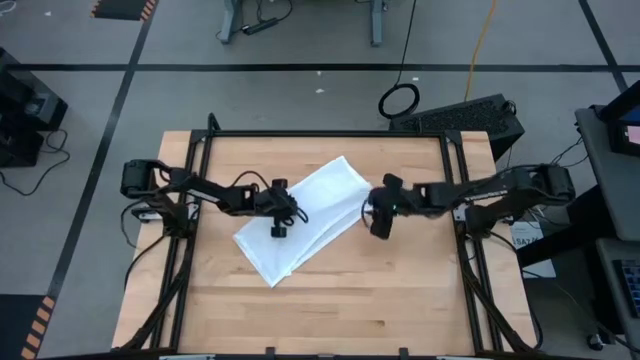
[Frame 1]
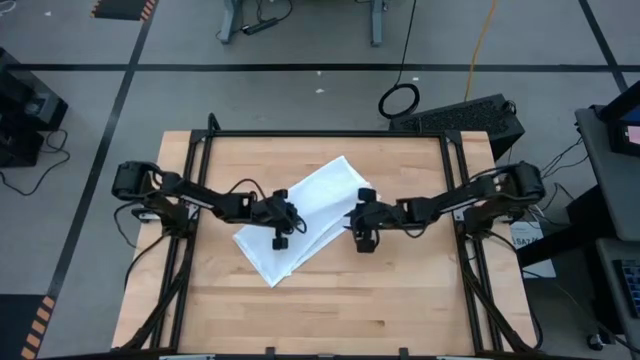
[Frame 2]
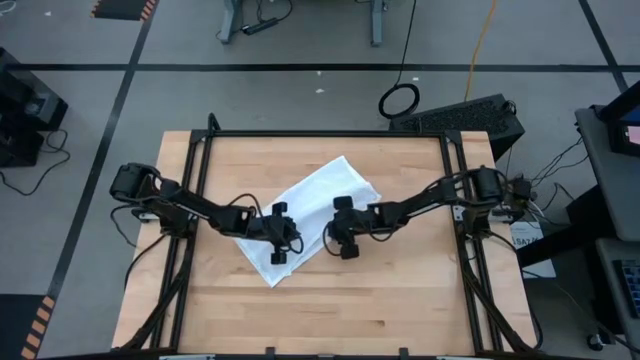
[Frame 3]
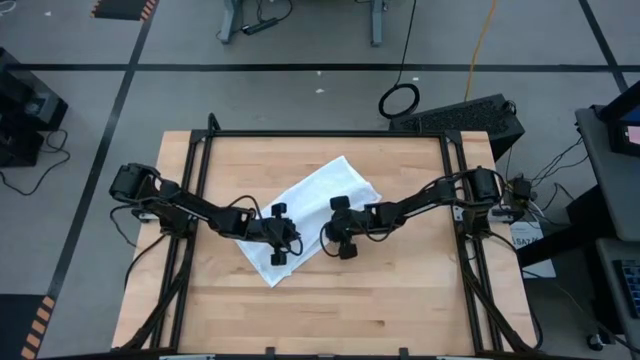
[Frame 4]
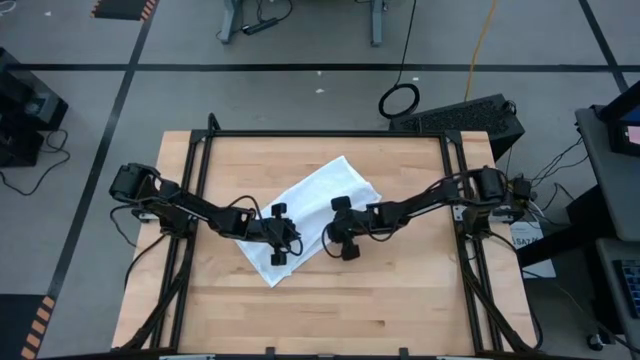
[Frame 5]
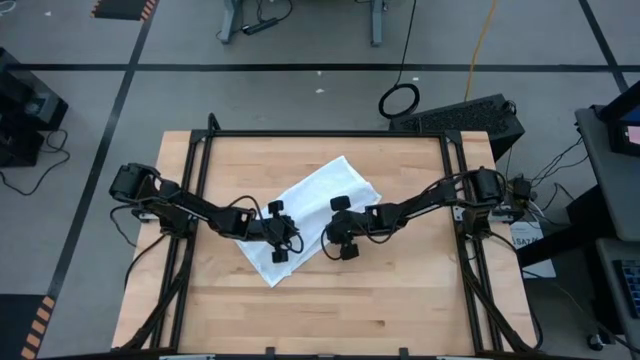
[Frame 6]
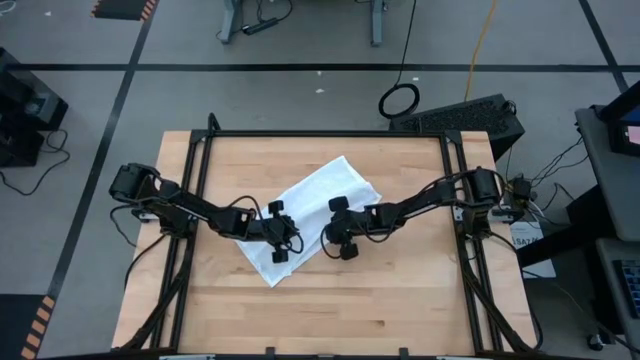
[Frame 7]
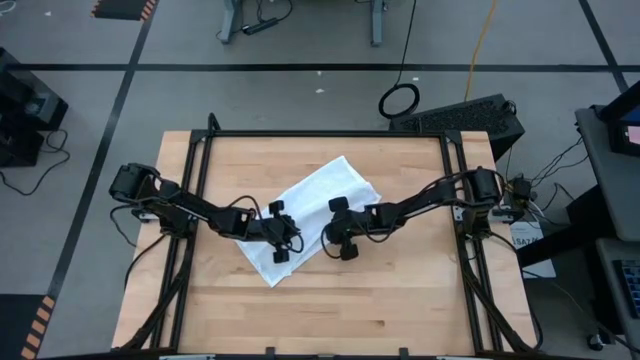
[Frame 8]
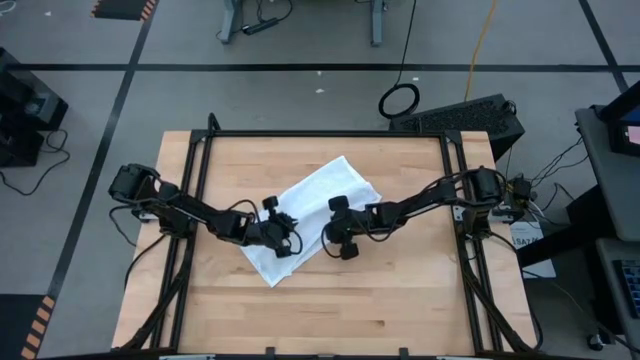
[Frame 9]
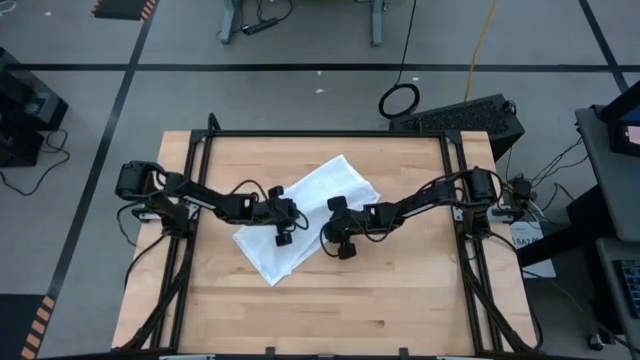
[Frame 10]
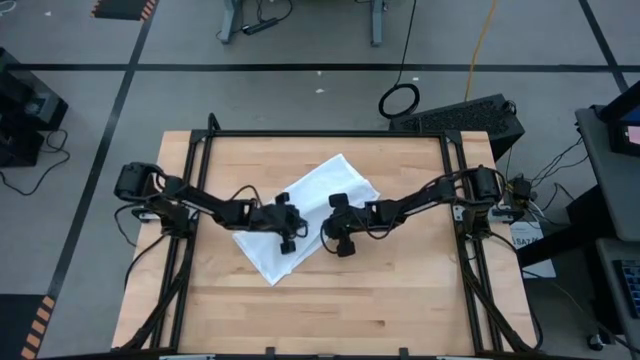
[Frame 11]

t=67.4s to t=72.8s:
Task: Roll napkin
Fold the white table napkin

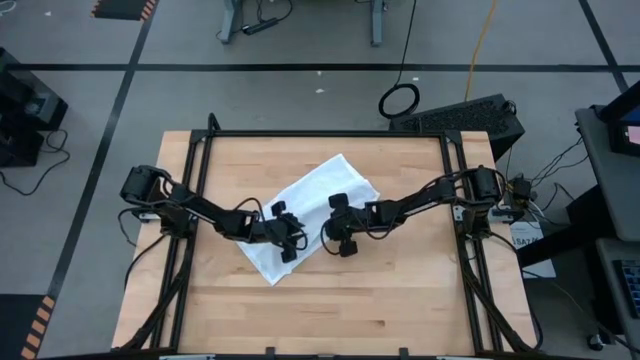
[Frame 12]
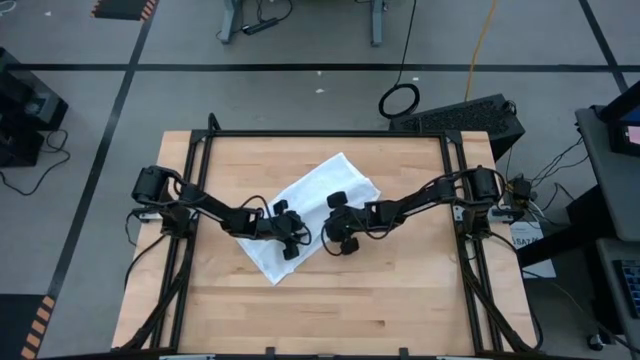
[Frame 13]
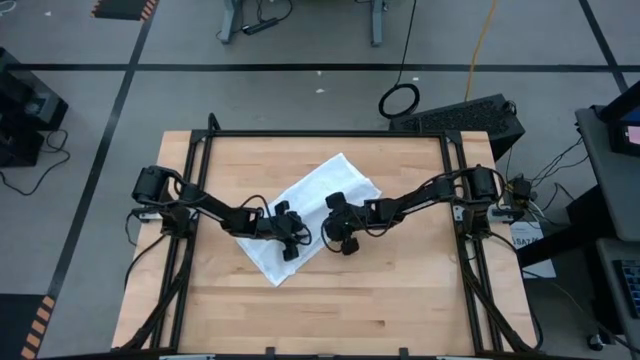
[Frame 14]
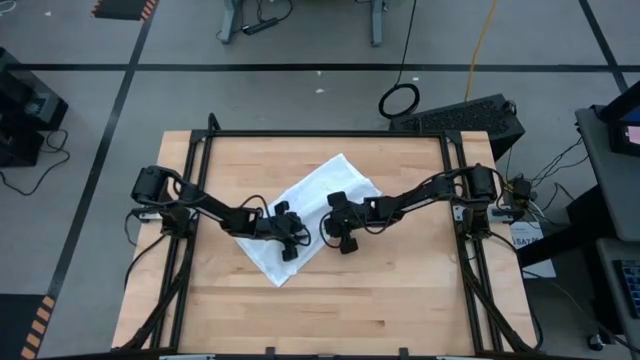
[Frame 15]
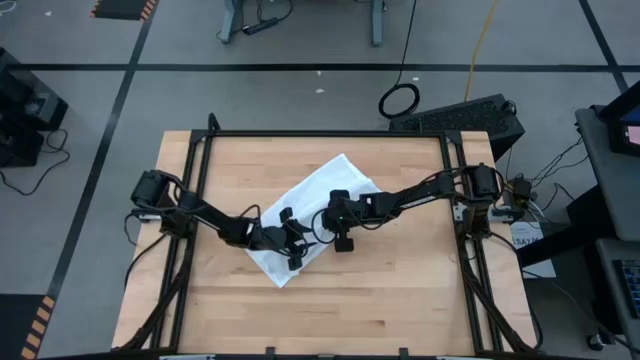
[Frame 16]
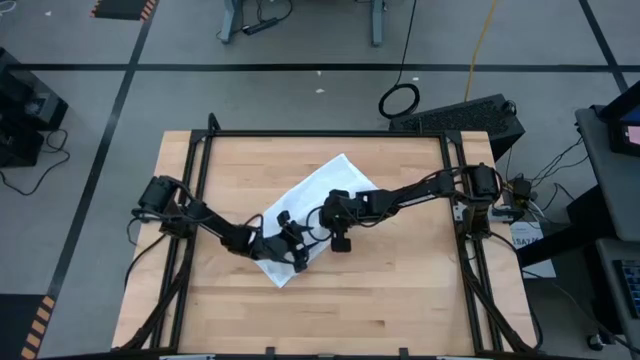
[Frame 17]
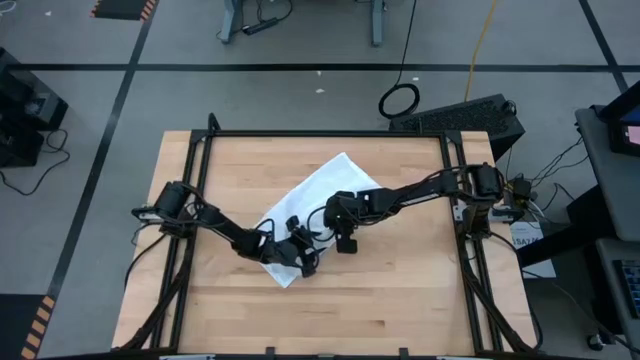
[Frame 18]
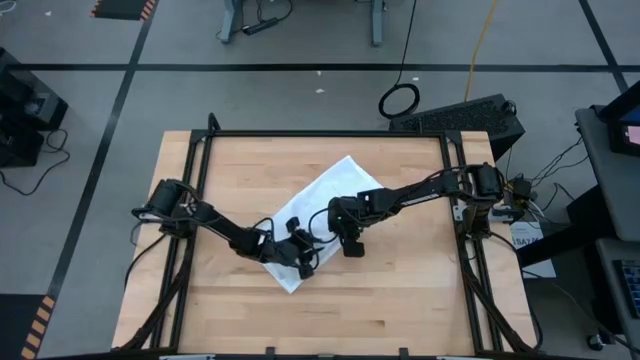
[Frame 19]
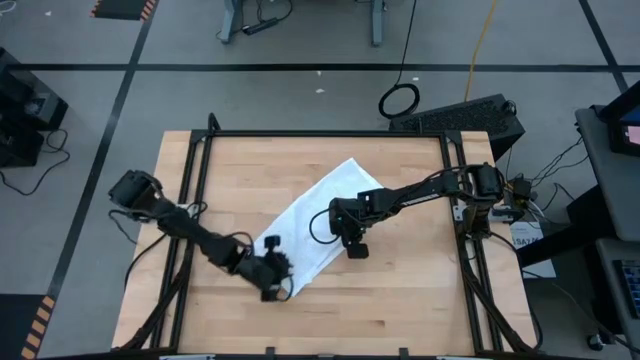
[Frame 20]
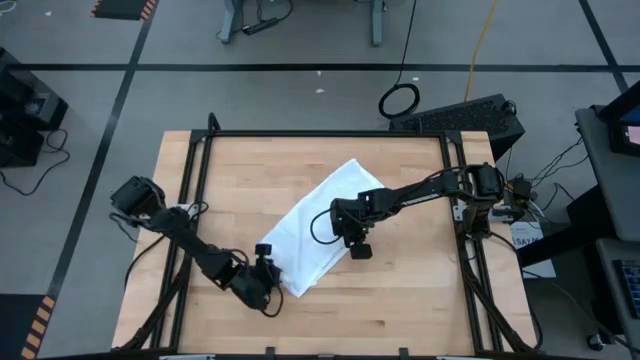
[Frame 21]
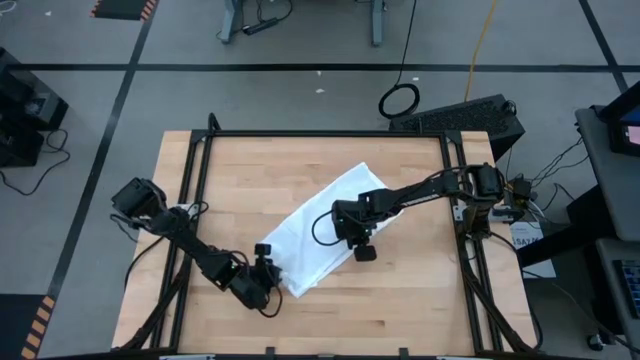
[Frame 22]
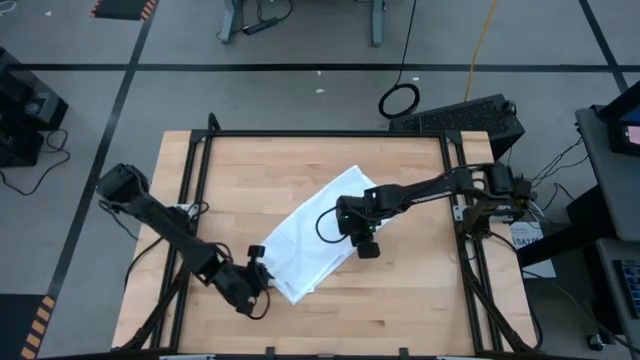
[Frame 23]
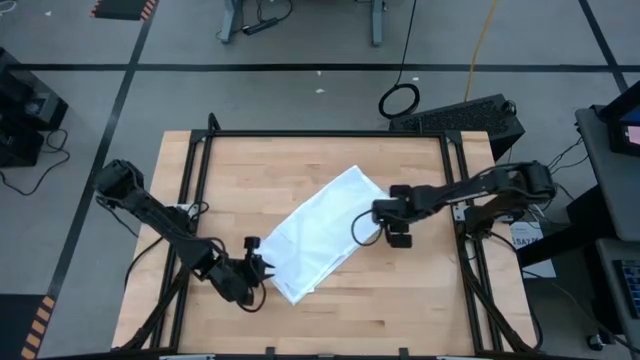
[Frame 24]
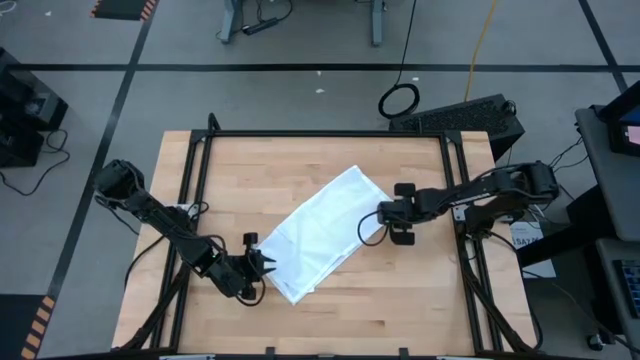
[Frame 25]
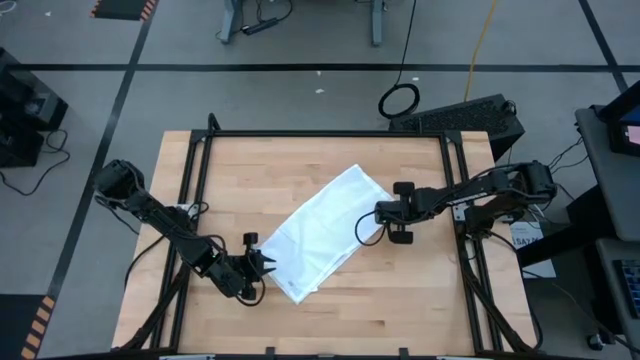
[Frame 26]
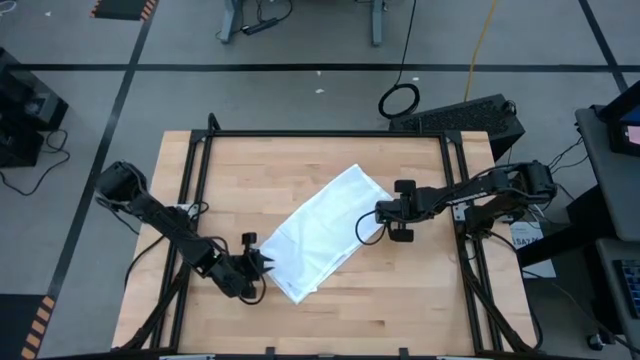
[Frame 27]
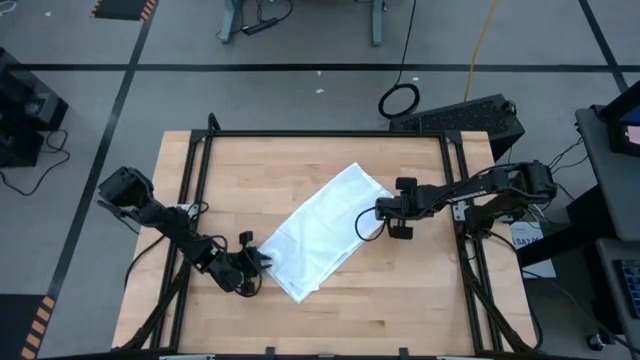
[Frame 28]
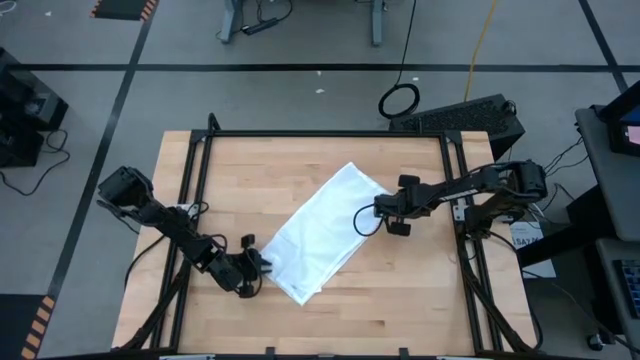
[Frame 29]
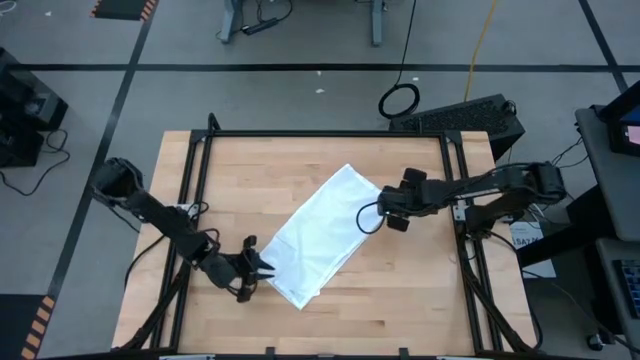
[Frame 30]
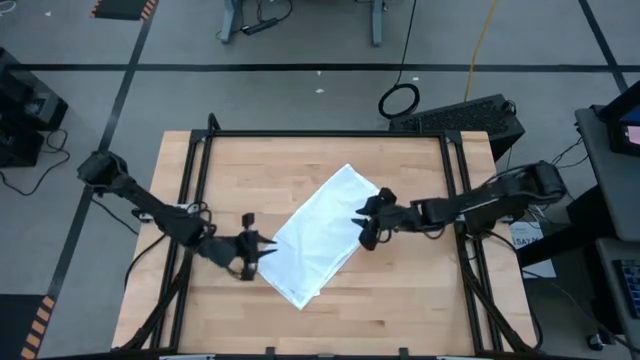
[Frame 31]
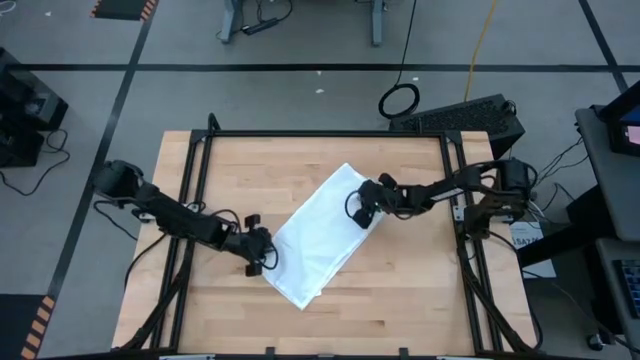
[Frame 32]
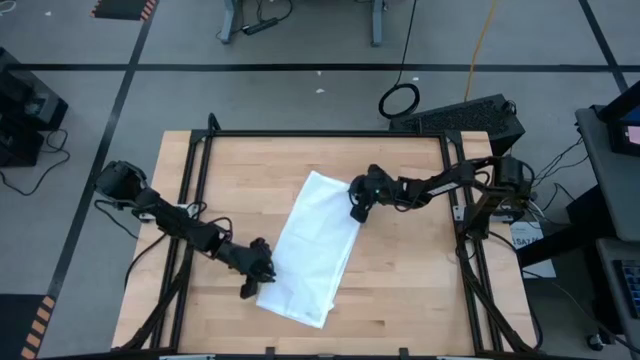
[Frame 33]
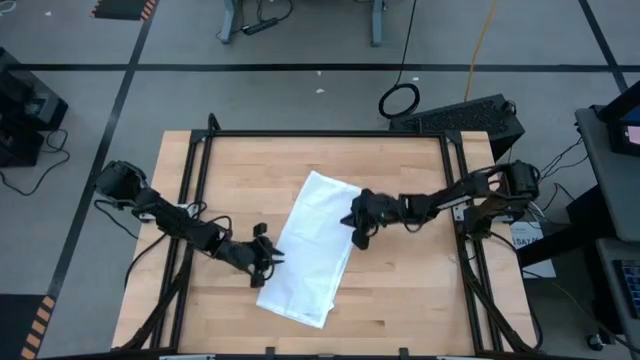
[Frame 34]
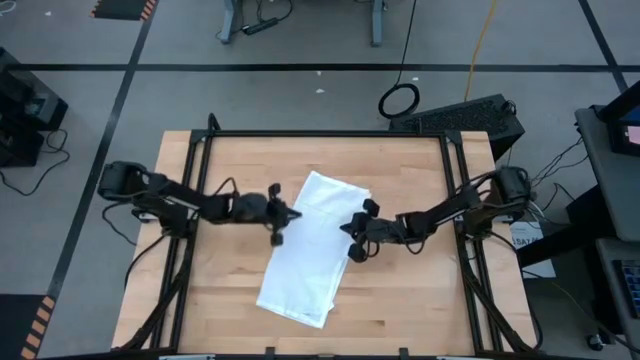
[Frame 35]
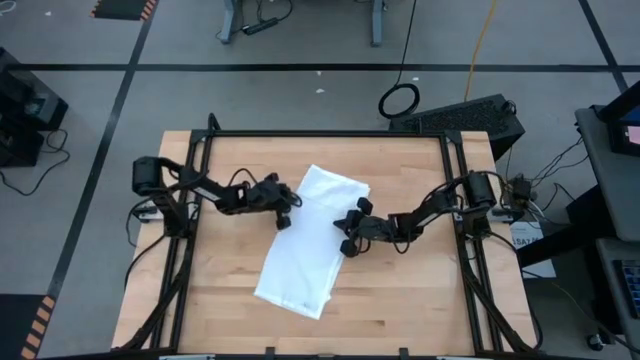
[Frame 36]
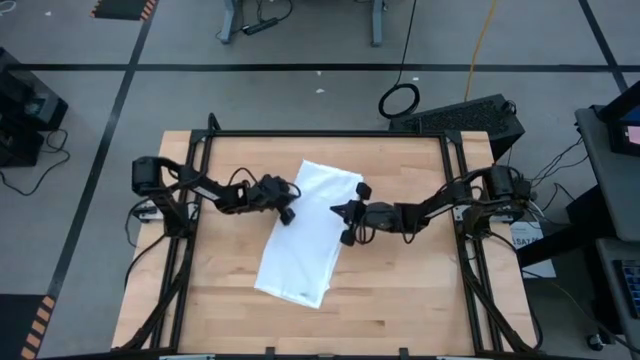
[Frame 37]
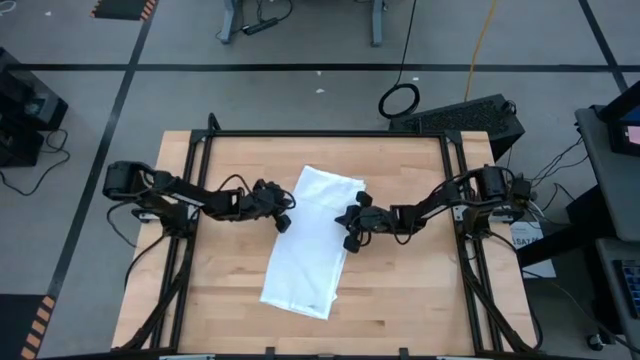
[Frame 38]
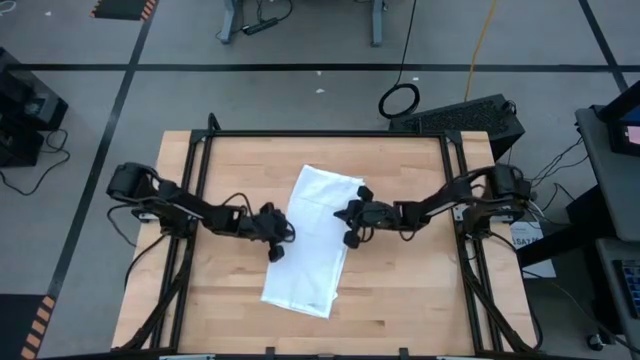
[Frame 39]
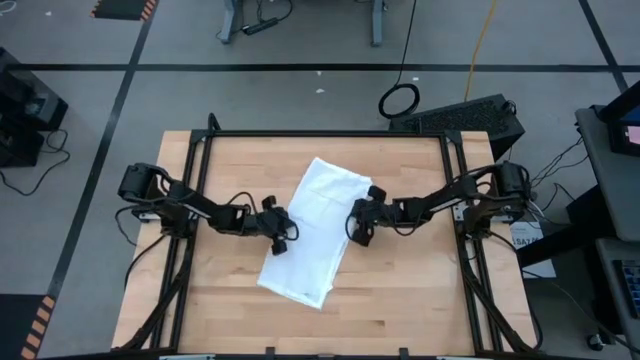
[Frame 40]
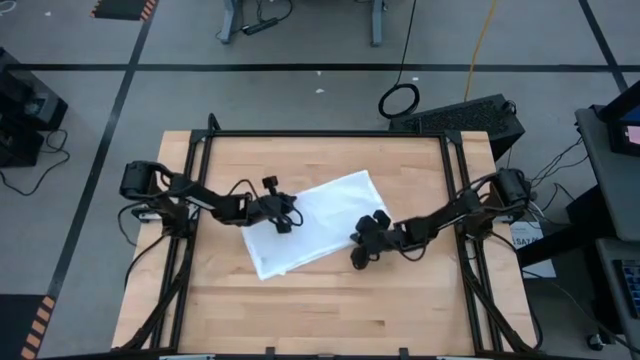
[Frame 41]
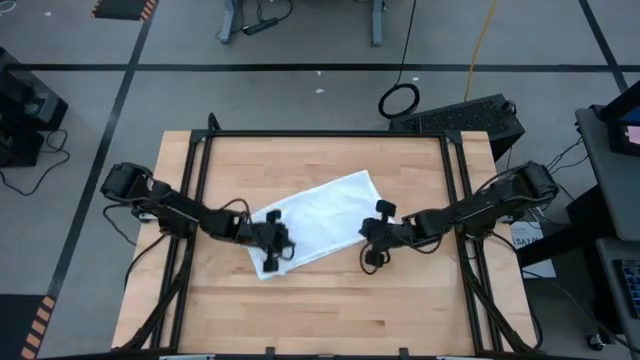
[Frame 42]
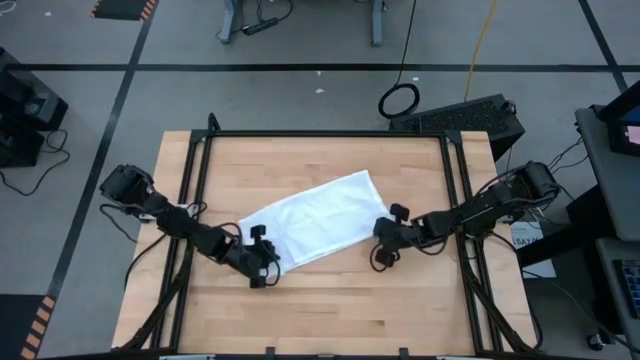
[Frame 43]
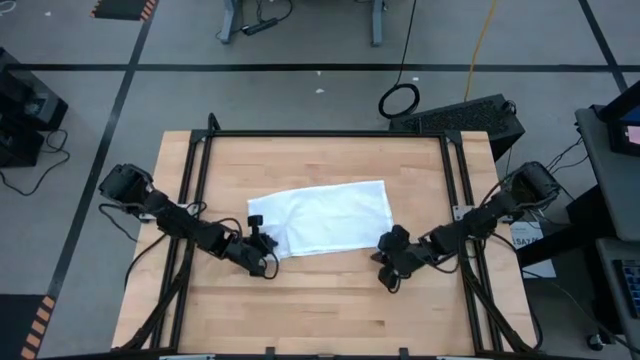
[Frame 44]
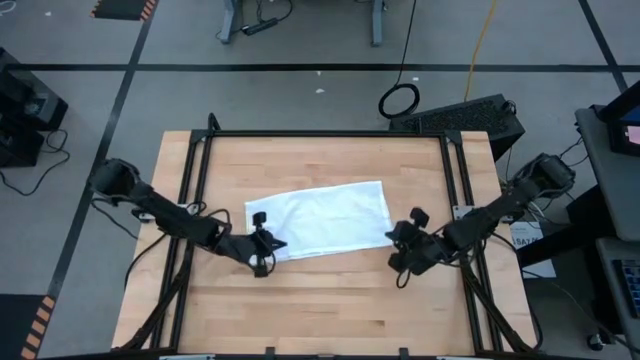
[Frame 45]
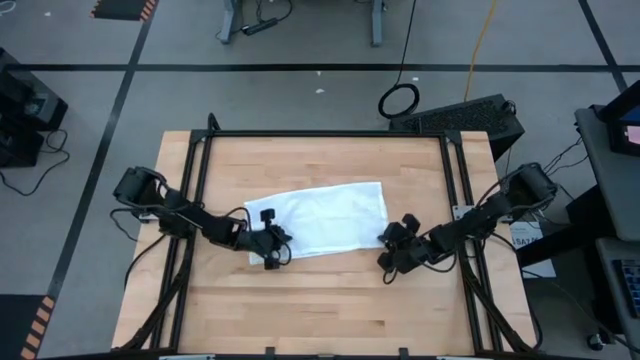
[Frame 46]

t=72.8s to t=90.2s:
Fold the white table napkin
